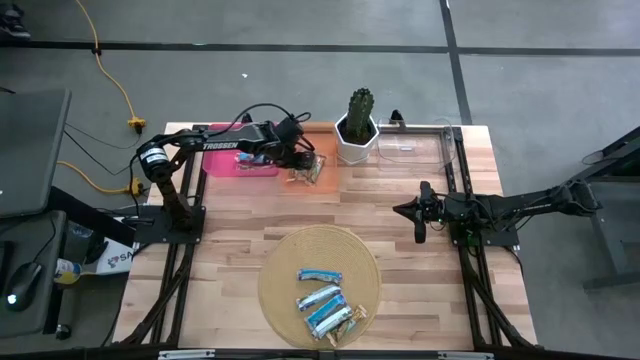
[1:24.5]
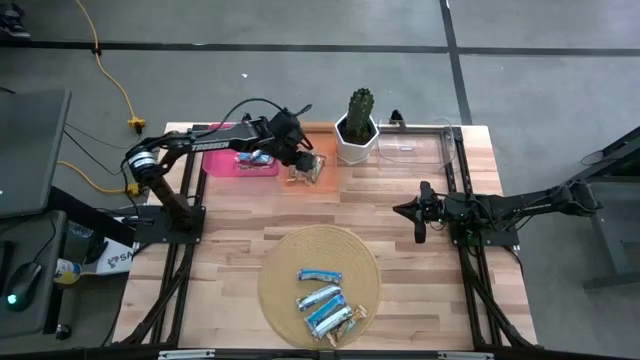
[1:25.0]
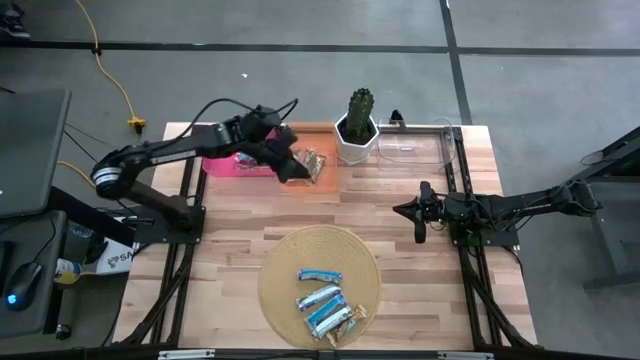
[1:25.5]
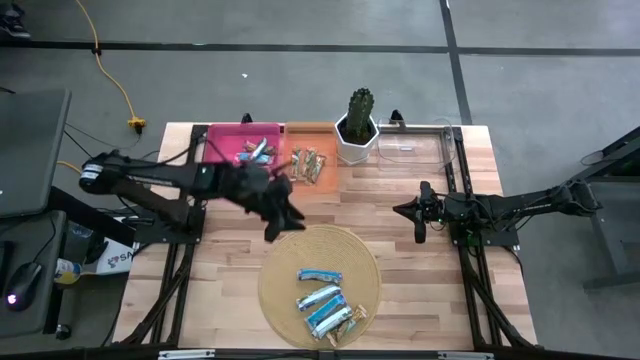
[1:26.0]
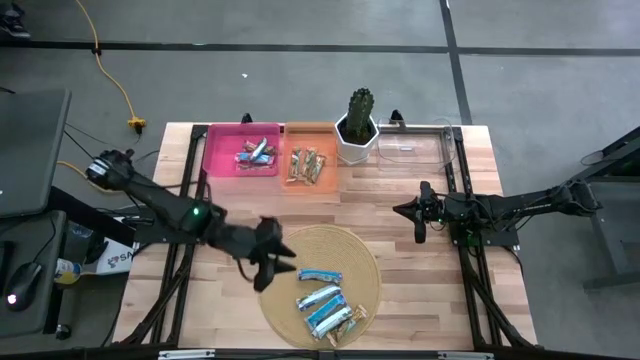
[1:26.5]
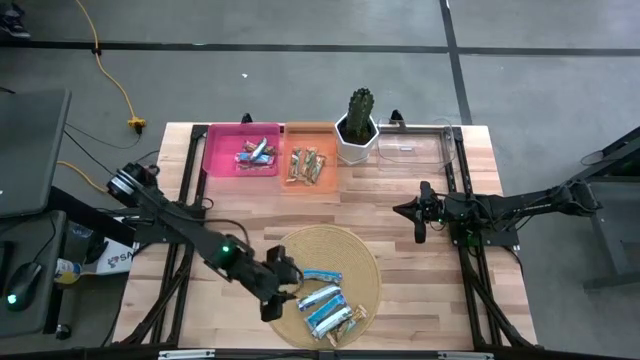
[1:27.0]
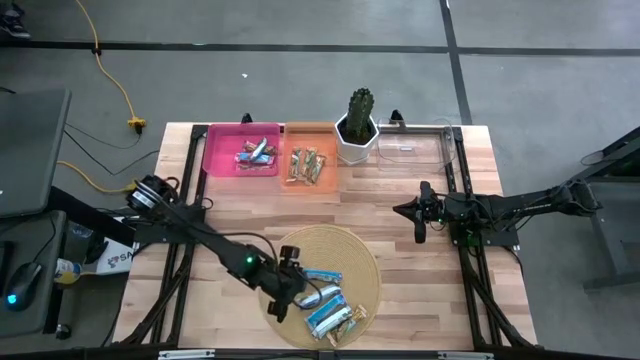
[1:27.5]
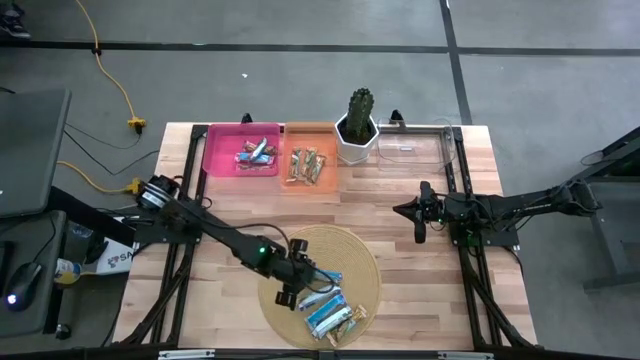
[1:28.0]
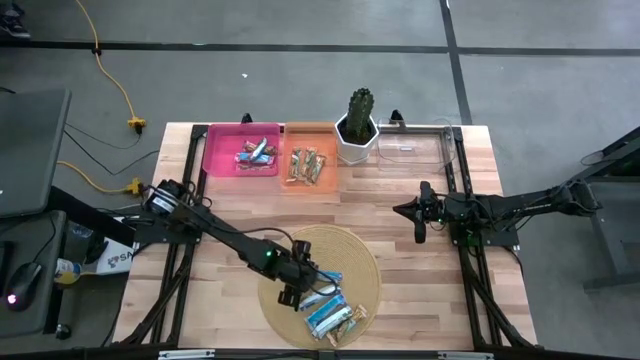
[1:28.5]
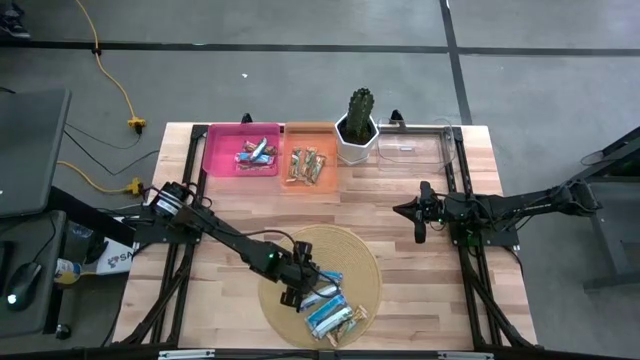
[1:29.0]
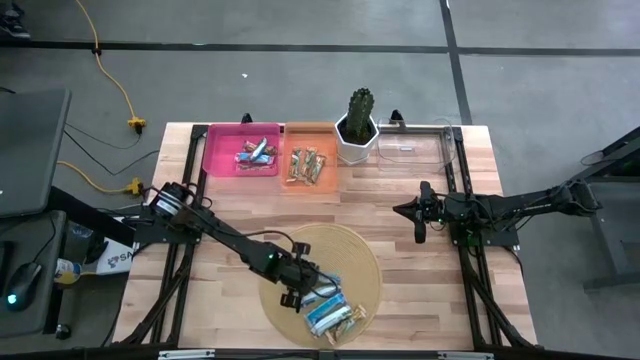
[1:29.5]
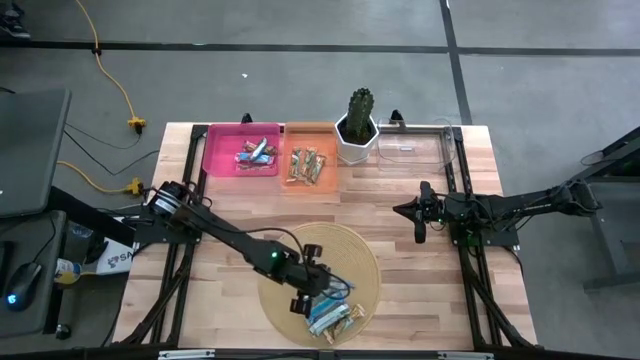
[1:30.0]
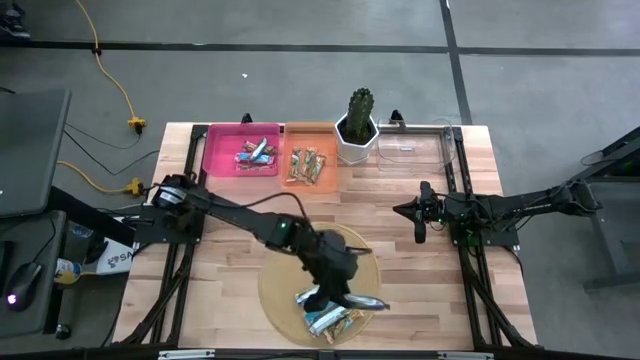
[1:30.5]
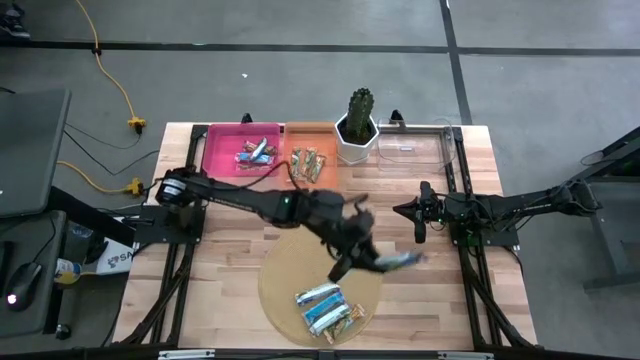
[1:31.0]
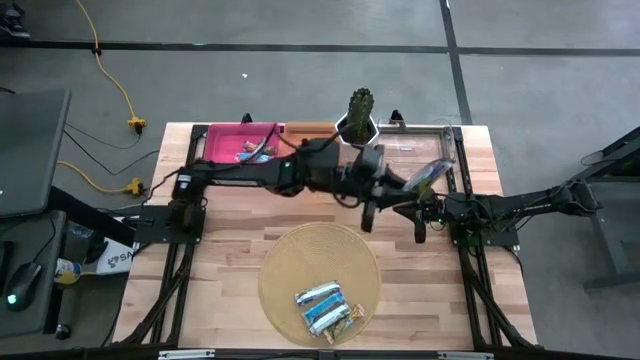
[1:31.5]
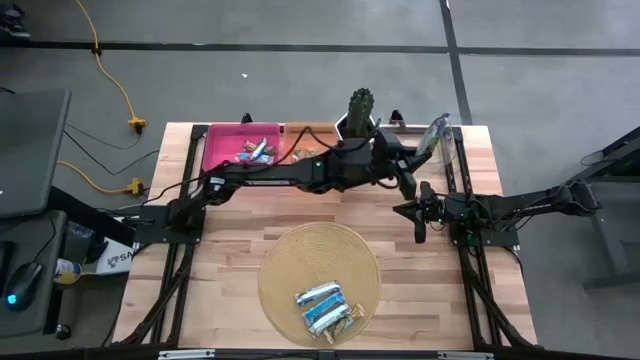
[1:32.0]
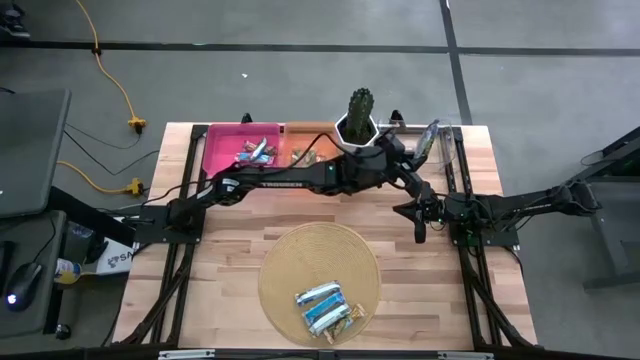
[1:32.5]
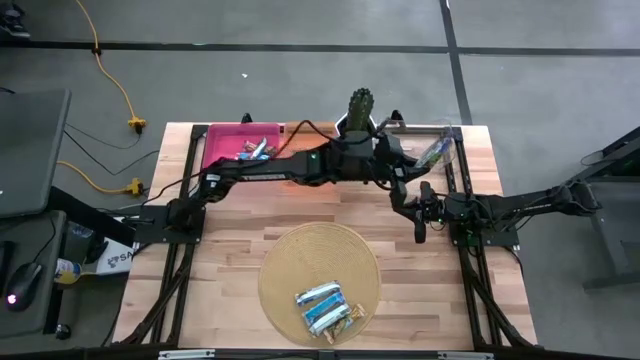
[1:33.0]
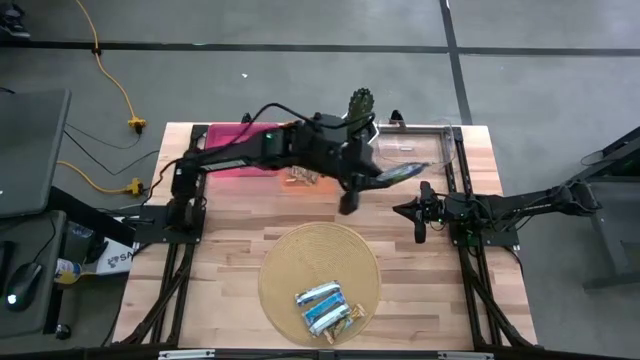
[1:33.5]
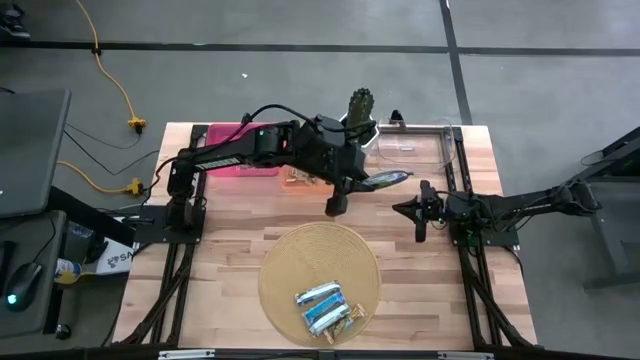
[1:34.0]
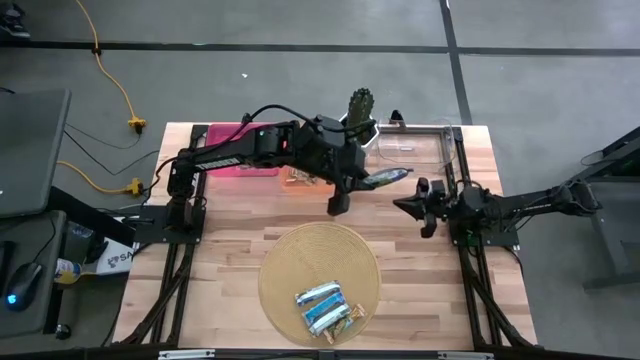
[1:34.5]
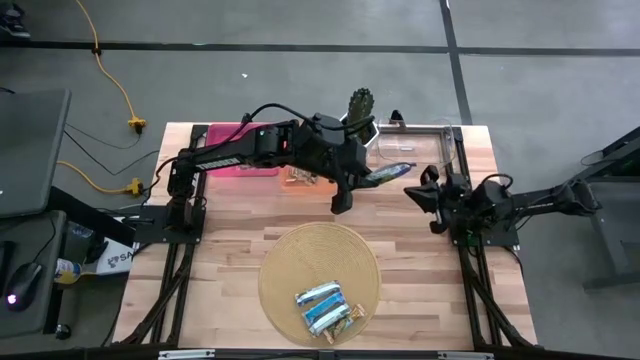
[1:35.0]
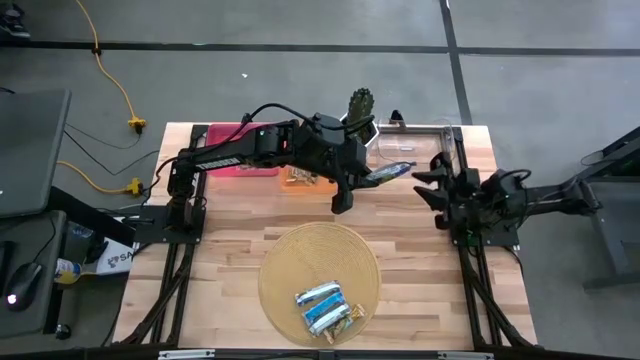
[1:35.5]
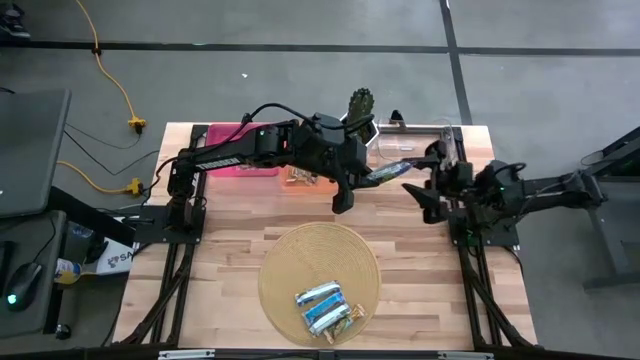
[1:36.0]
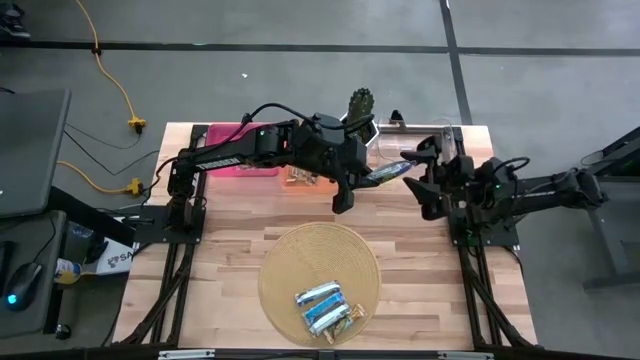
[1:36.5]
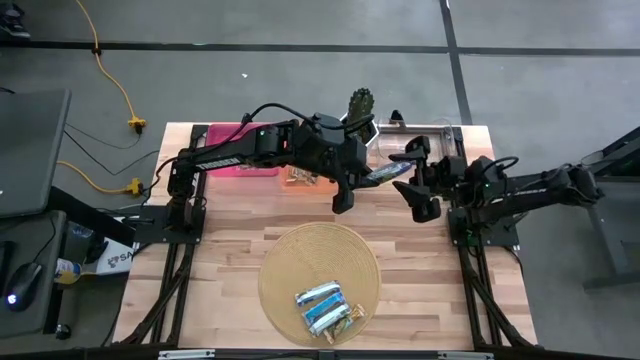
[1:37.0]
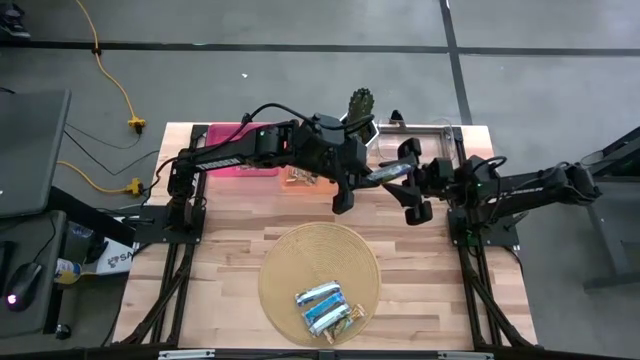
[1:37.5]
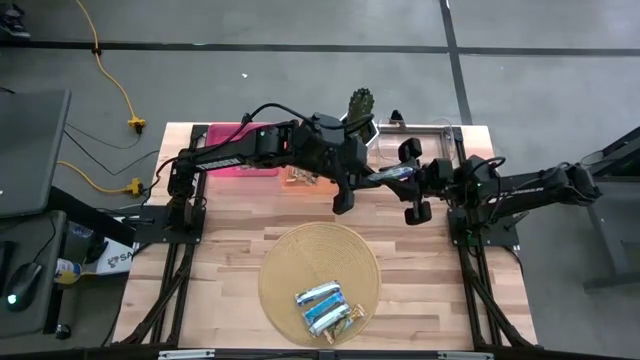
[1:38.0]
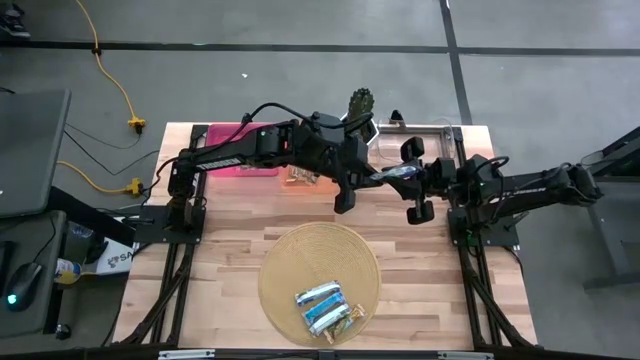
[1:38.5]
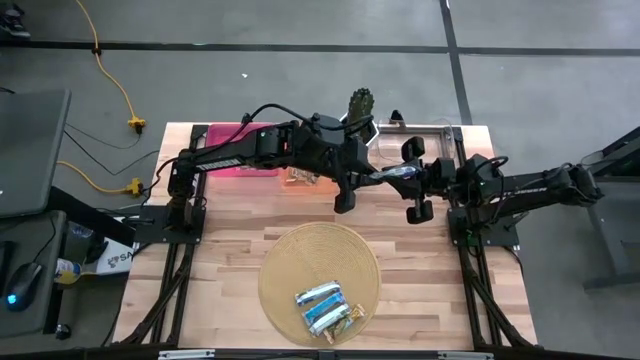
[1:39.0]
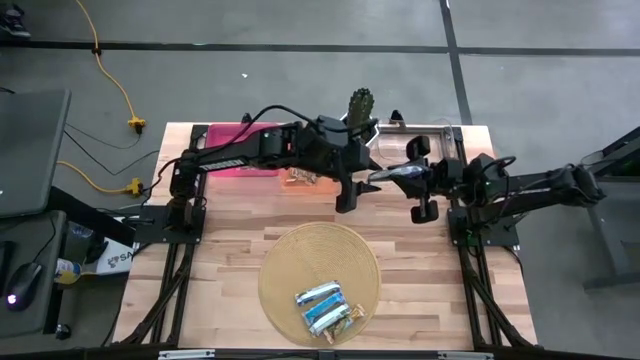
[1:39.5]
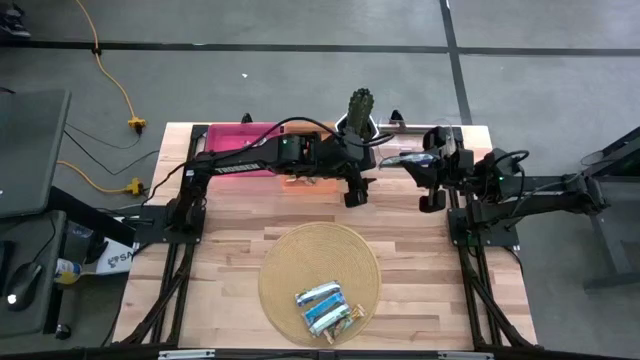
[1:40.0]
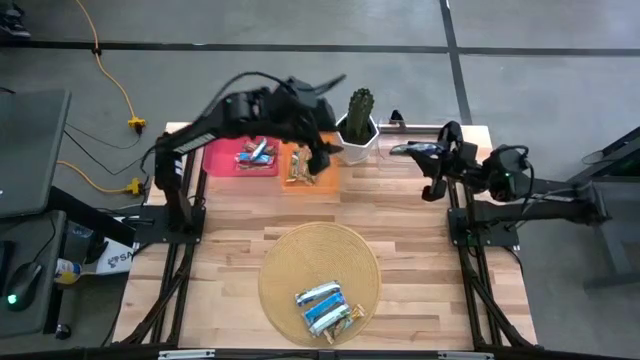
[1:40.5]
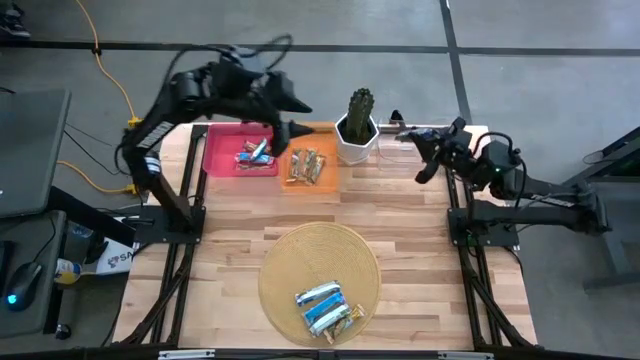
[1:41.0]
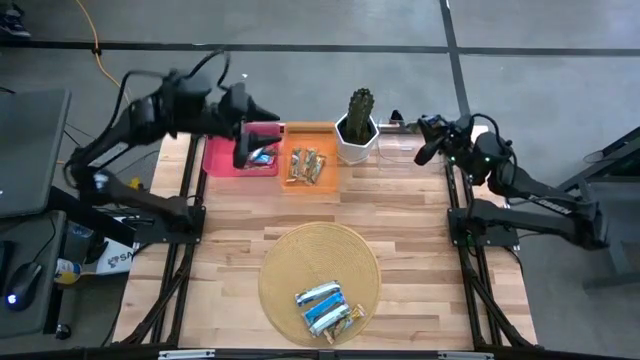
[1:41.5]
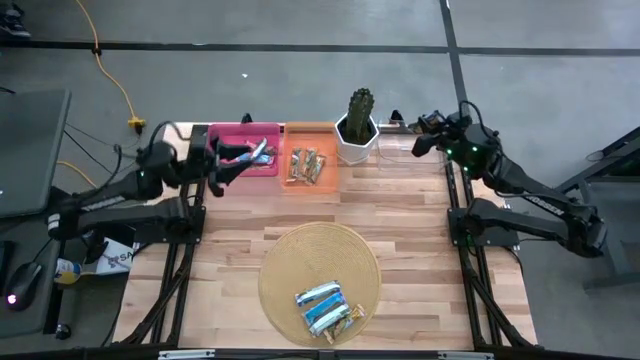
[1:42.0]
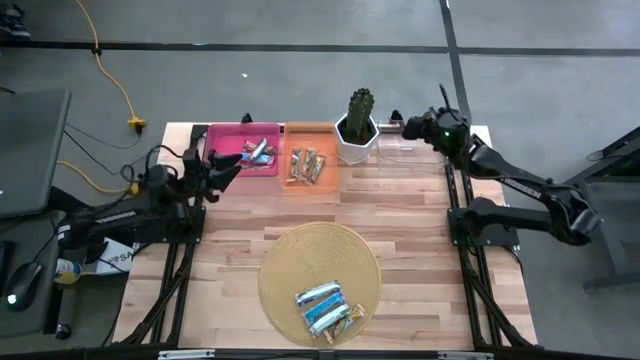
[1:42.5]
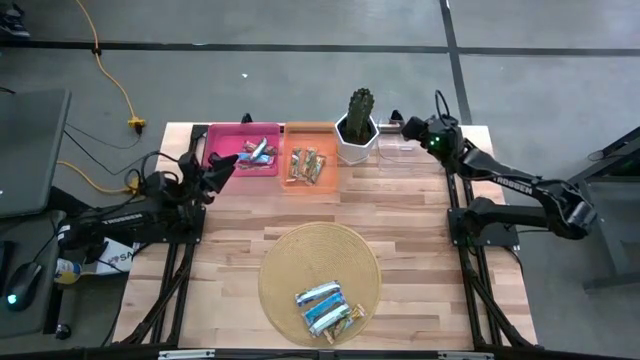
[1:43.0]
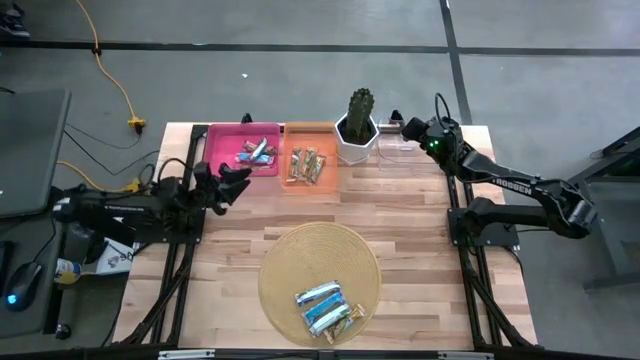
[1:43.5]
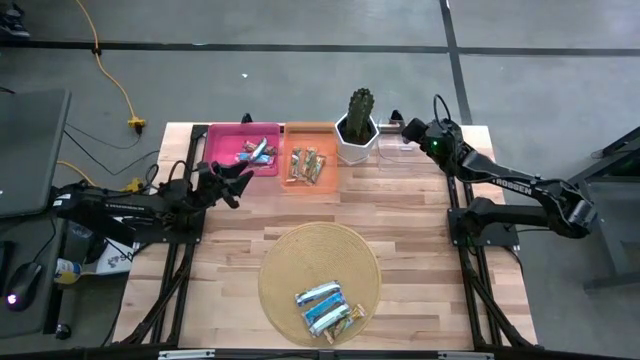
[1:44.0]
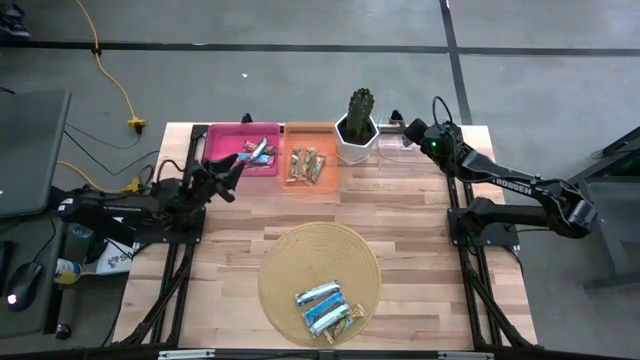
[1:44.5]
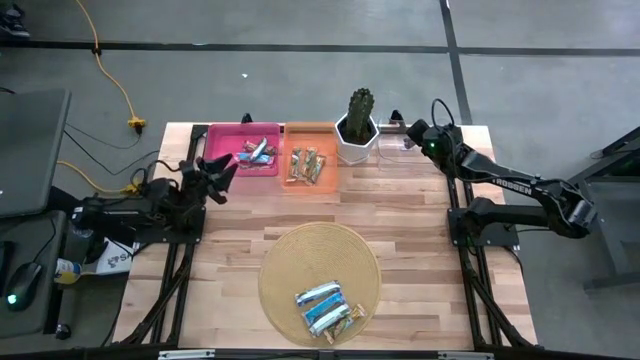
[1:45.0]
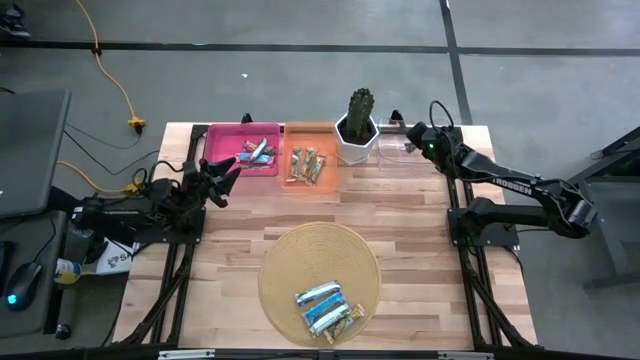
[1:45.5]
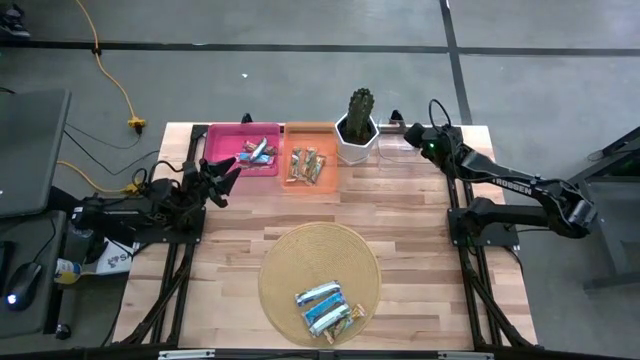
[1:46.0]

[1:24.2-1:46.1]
Task: Pick and place Granola Bars by type
Put the blue granola bar into the transparent bin
